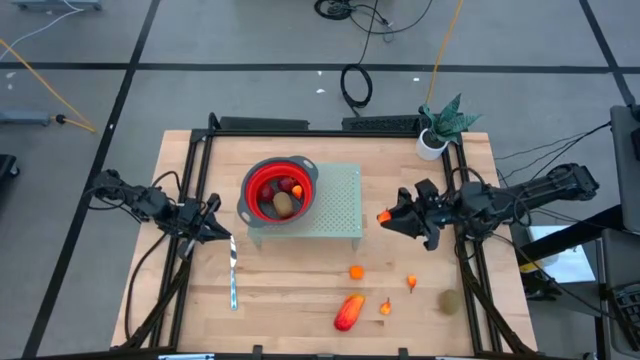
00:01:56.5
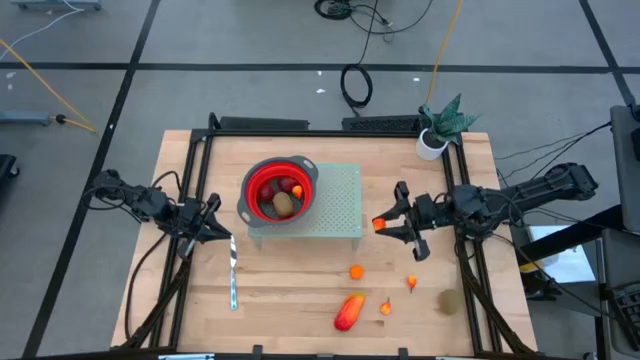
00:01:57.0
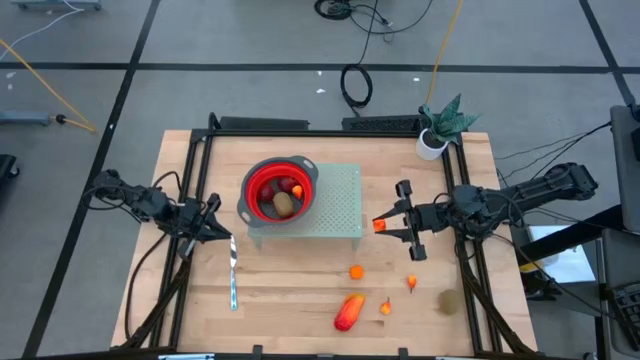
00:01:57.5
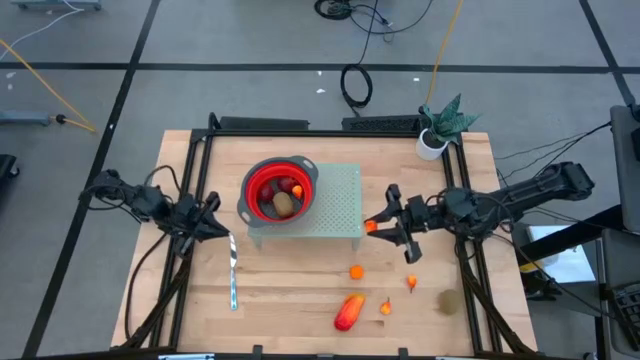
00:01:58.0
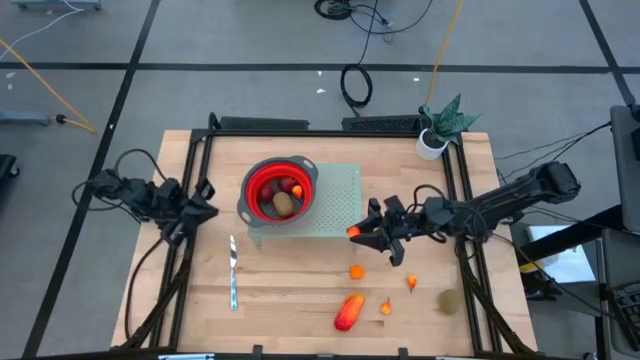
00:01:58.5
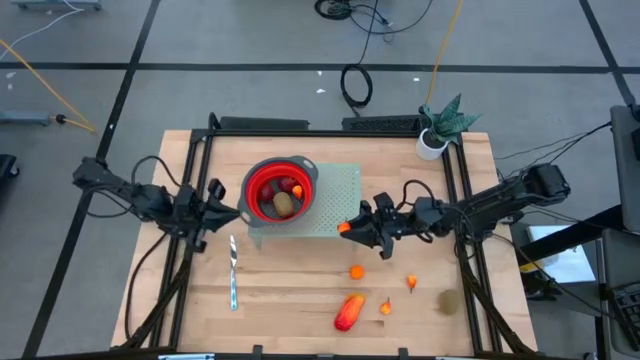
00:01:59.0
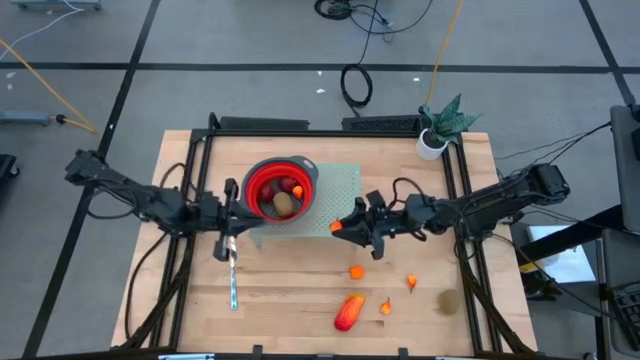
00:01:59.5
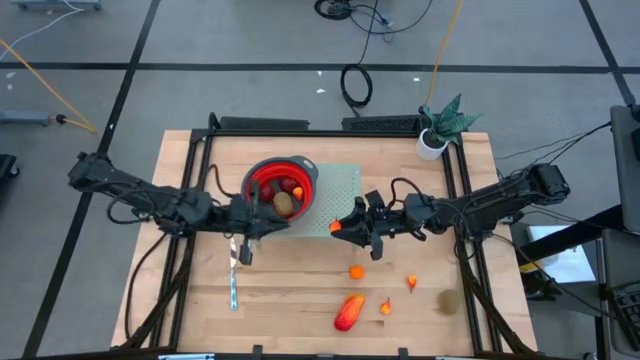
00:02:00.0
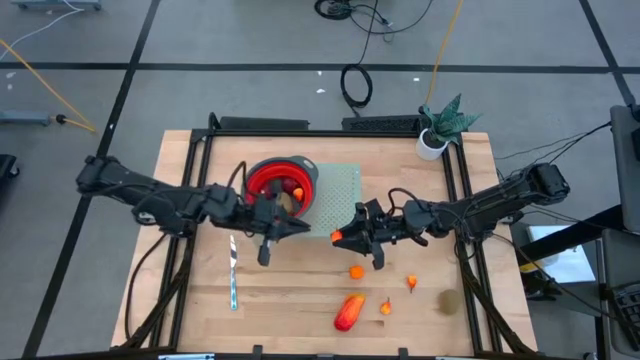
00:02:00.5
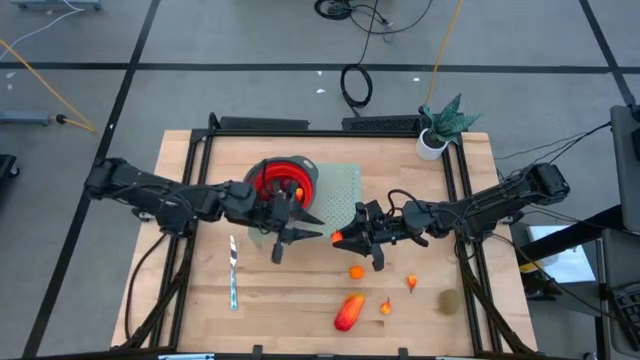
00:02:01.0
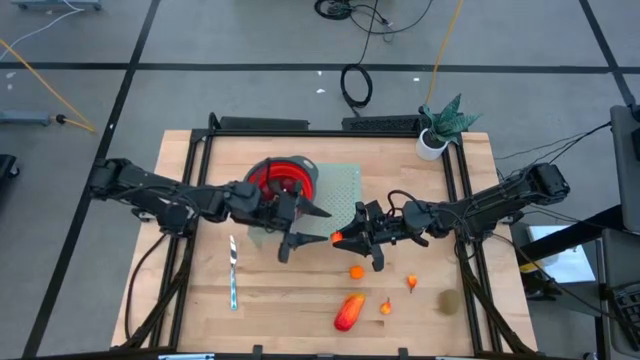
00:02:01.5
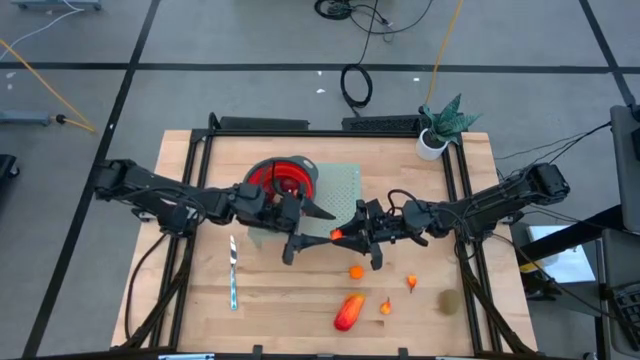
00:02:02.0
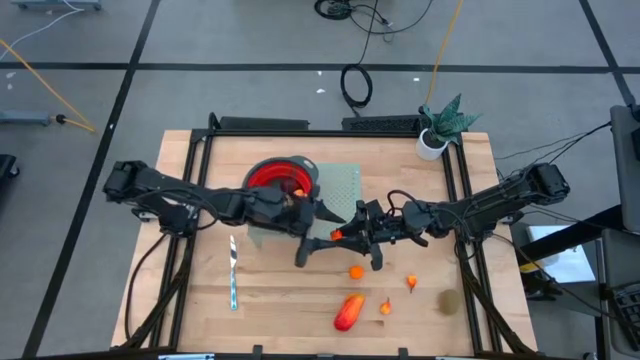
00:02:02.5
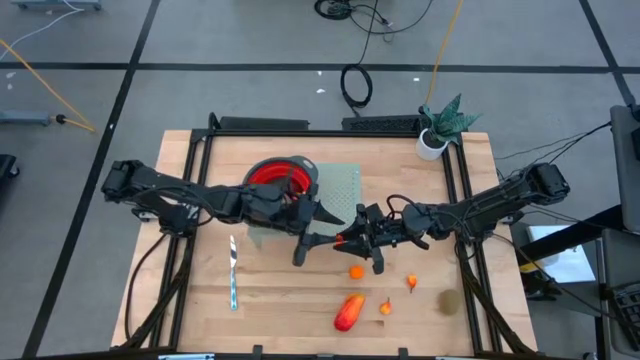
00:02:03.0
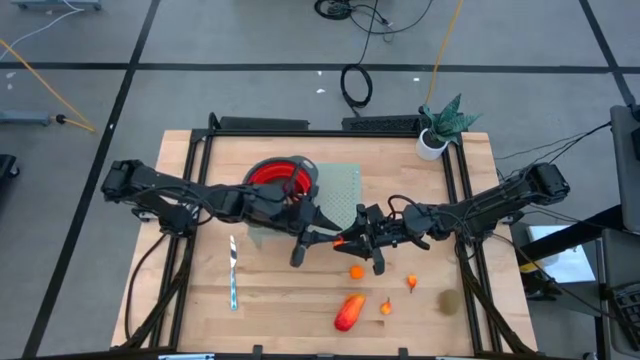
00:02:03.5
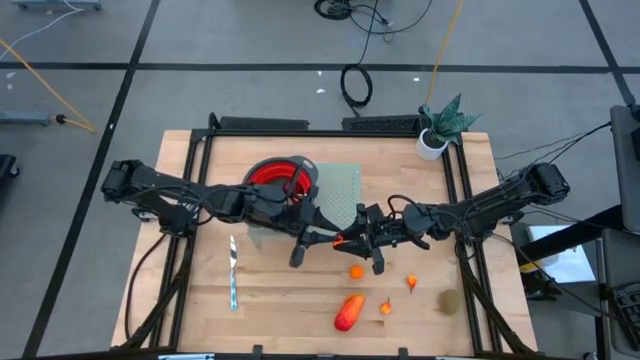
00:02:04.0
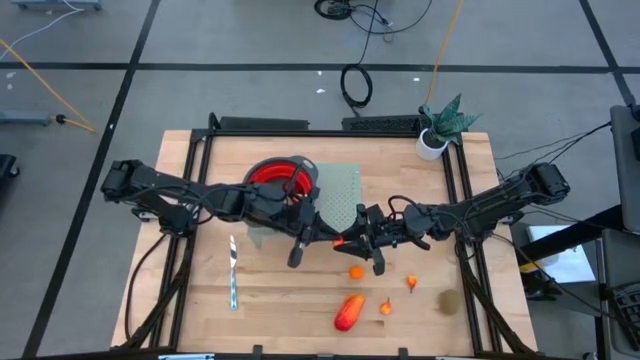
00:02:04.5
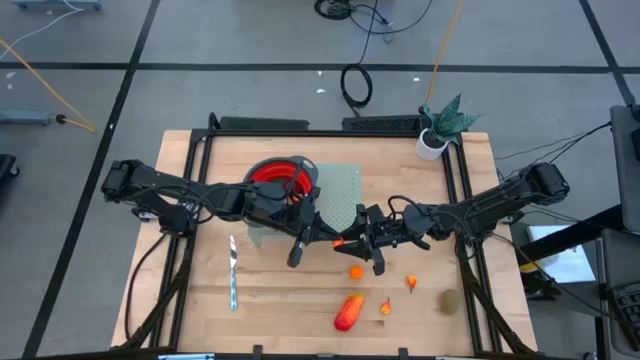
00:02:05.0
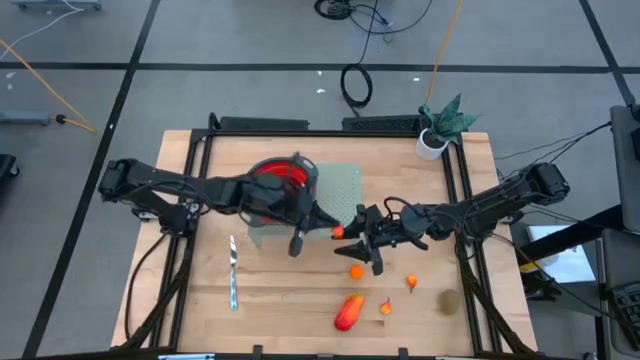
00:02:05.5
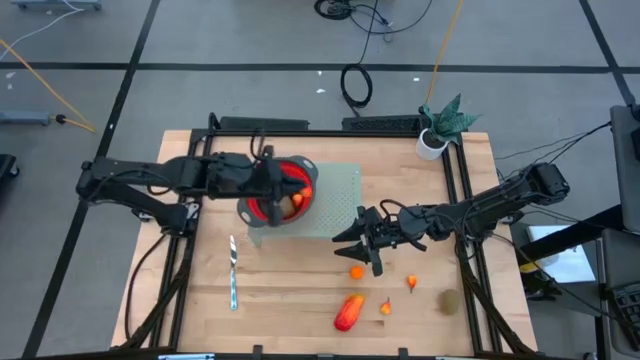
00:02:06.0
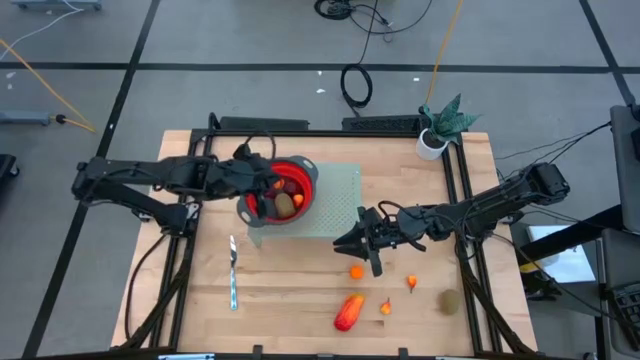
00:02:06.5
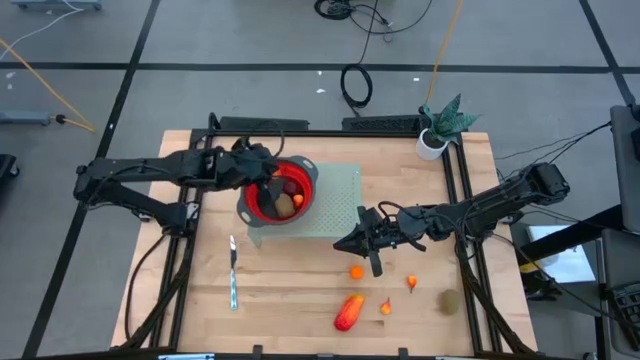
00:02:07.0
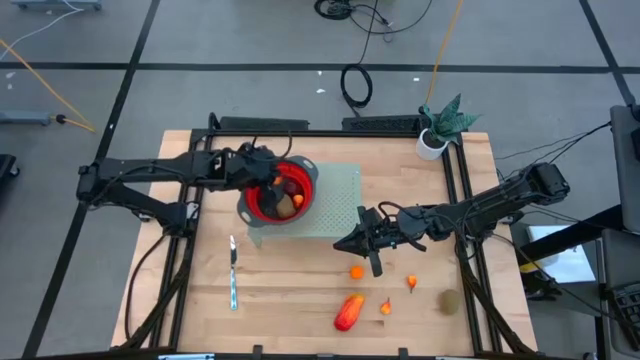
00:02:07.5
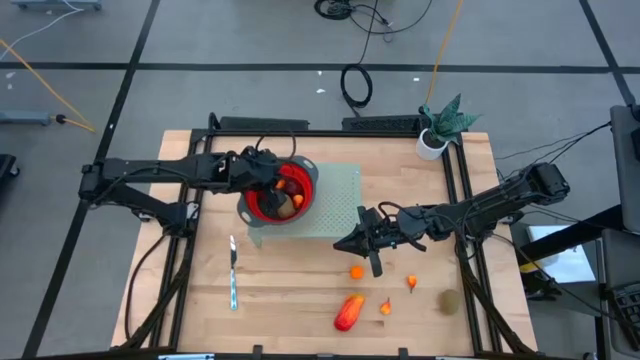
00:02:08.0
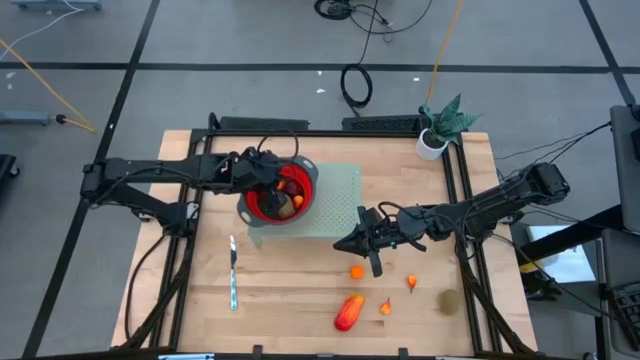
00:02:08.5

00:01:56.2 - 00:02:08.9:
Task: Pick & Place Fruit
Put the top peach into the strainer bowl on the shelf

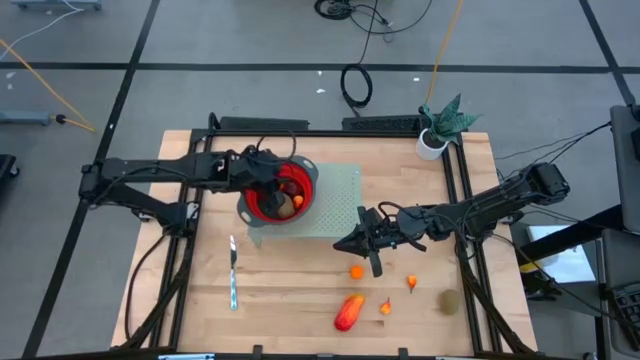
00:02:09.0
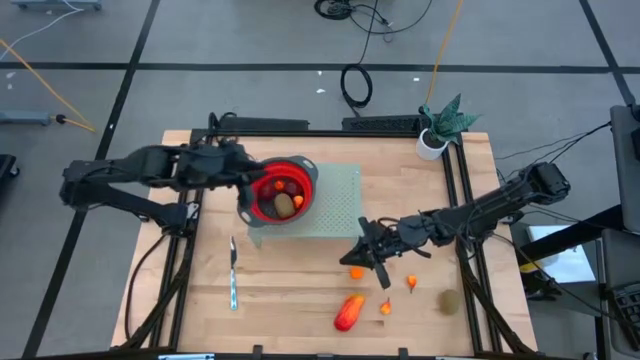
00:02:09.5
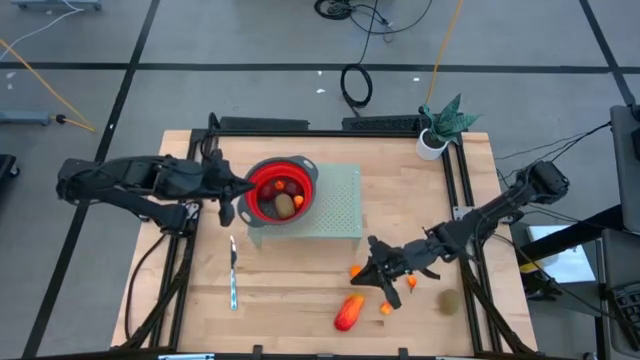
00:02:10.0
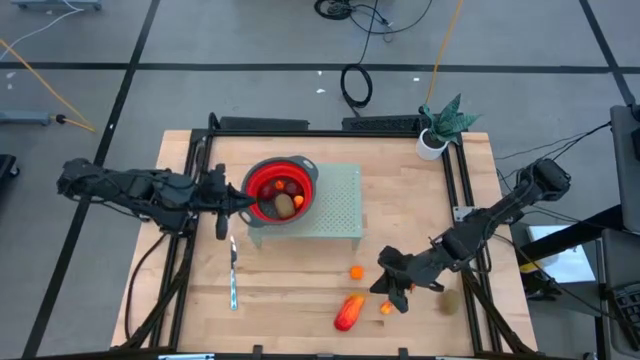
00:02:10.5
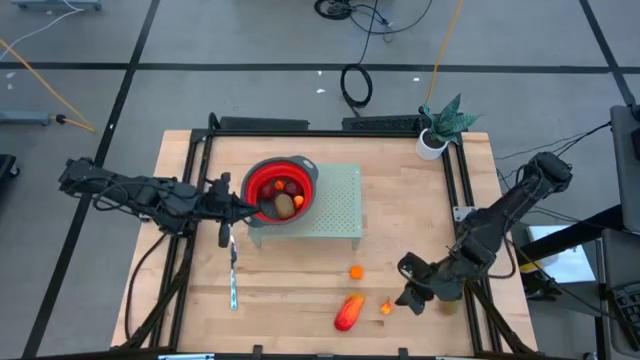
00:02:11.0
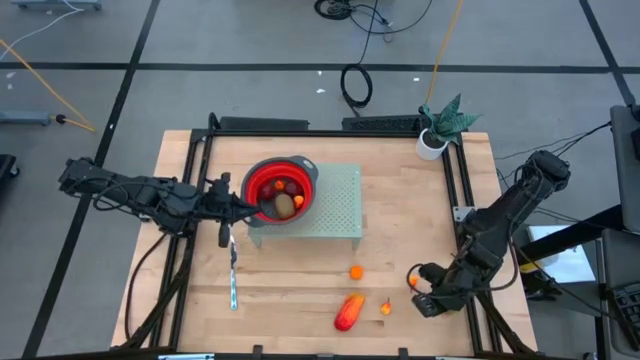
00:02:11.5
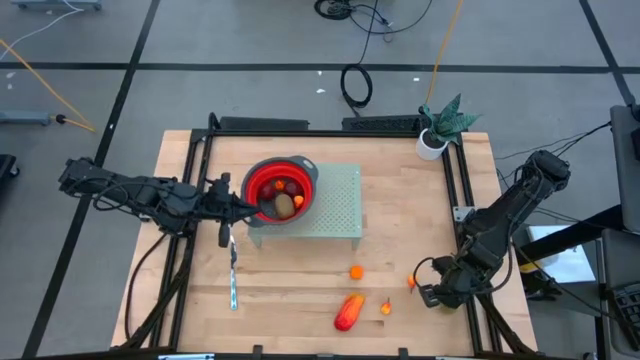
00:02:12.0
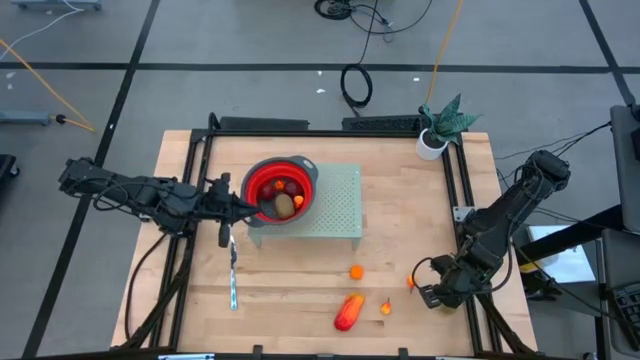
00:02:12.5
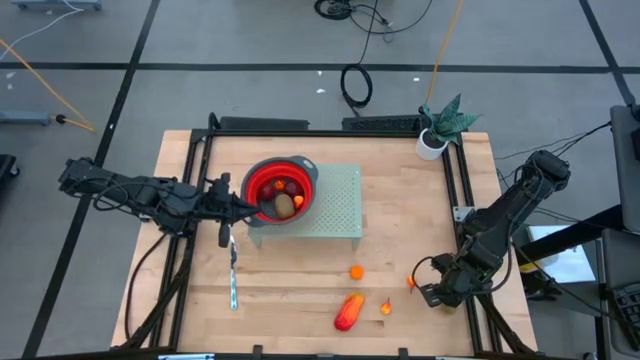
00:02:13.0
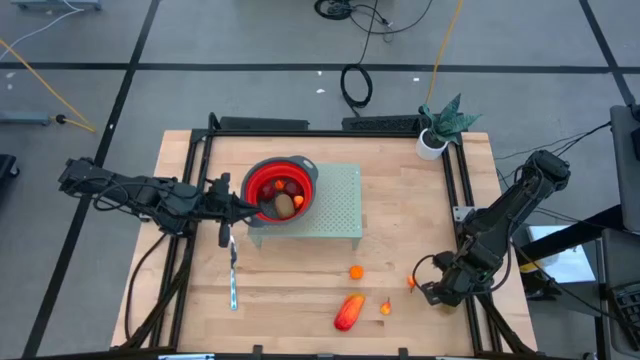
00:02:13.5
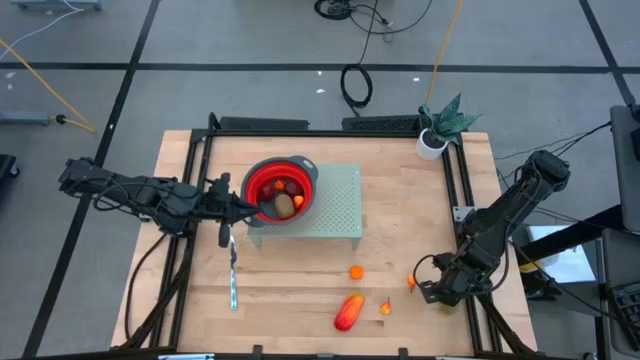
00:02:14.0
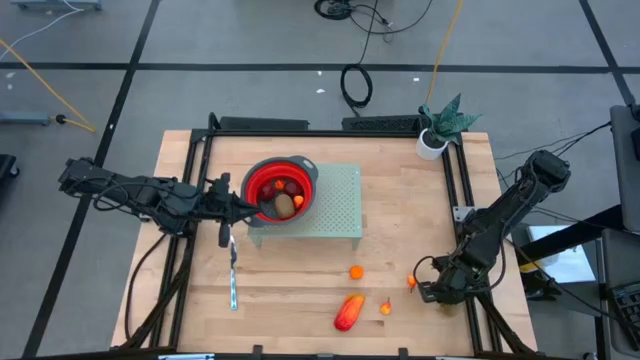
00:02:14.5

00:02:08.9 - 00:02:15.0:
Put the kiwi into the strainer bowl on the shelf

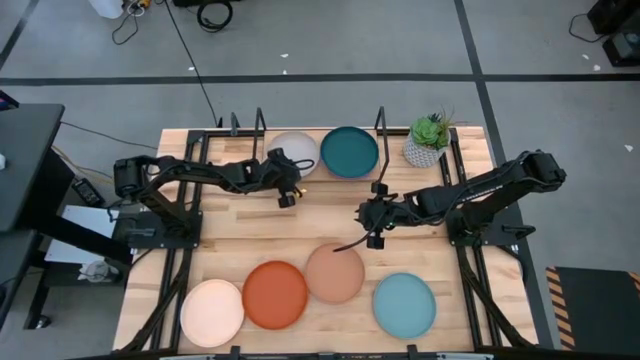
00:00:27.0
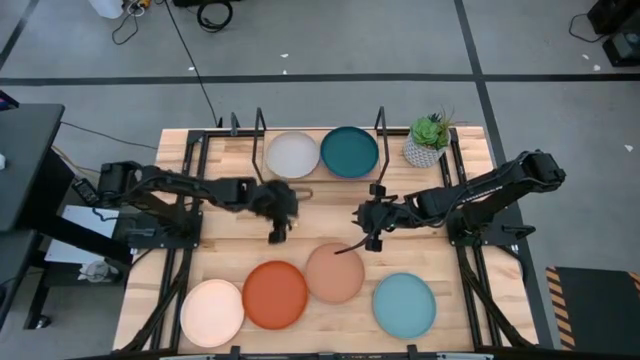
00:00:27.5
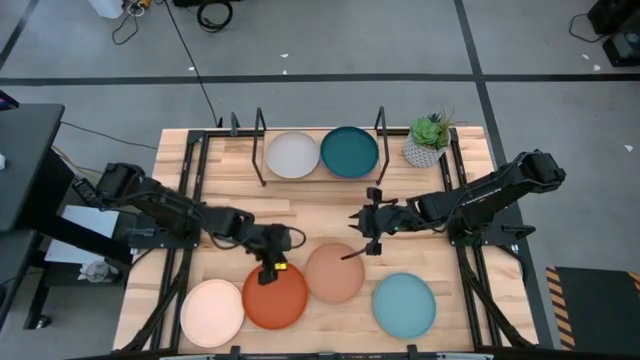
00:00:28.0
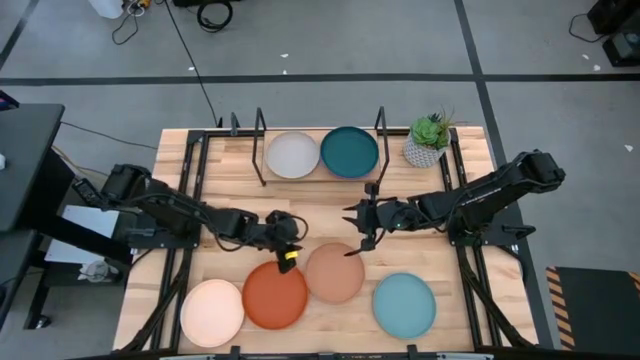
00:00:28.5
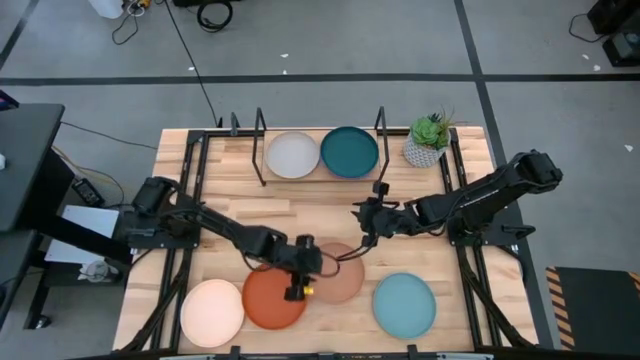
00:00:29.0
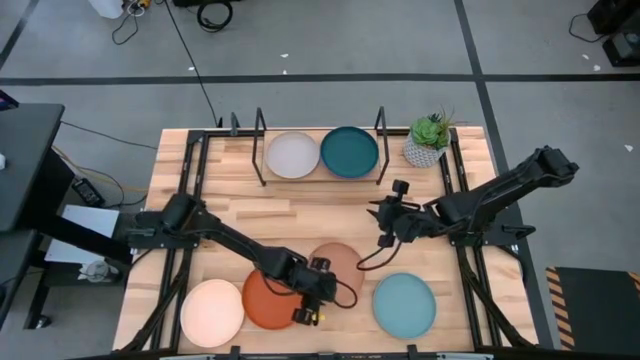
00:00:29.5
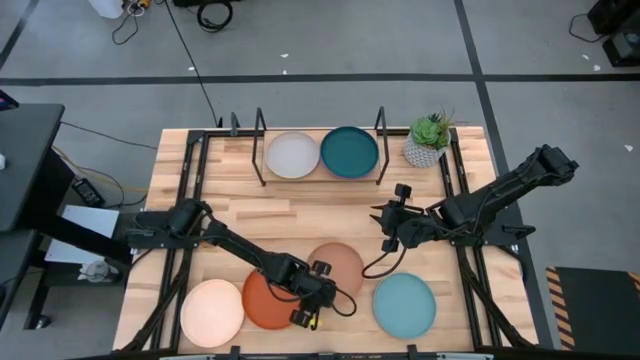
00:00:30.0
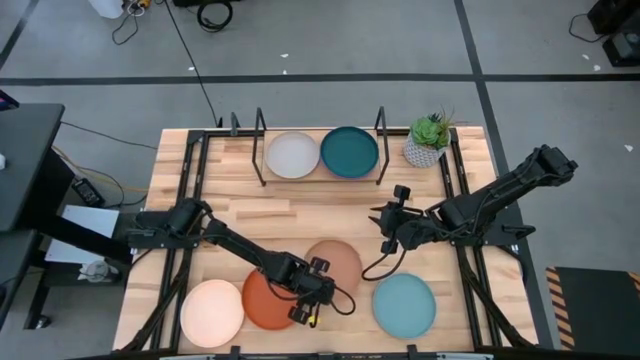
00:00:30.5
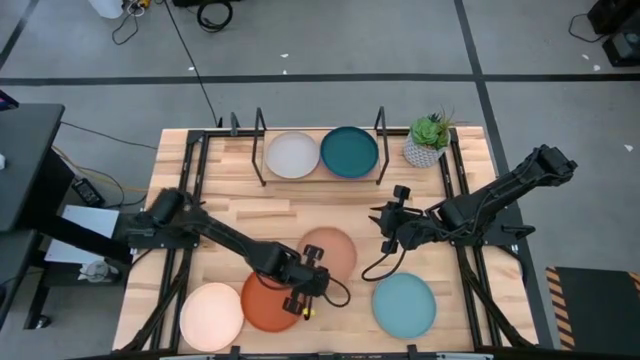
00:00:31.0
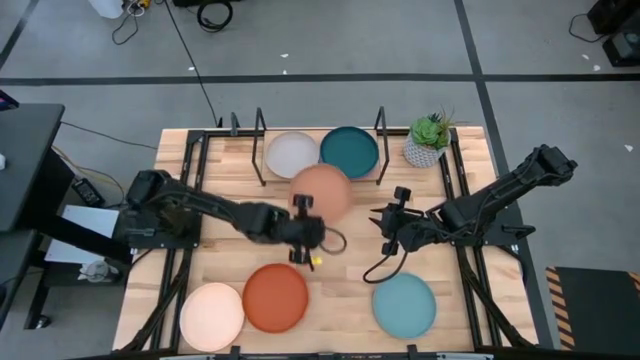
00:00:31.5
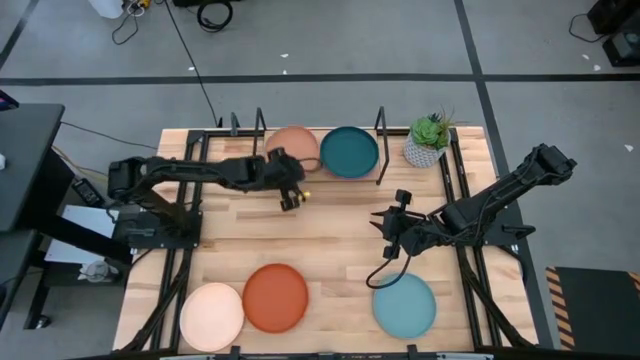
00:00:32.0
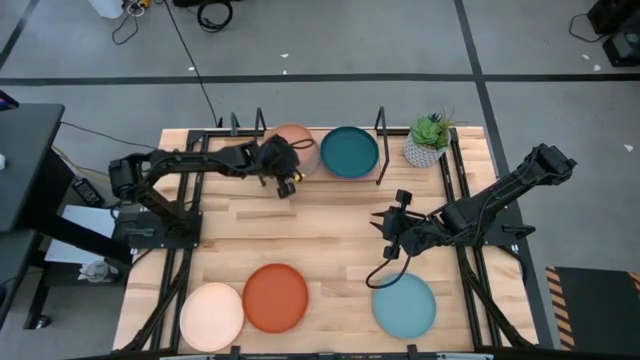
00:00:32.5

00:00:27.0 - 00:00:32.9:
Task: Place and stack plates onto a shelf
Stack the brown plate on top of the gray plate on the shelf
